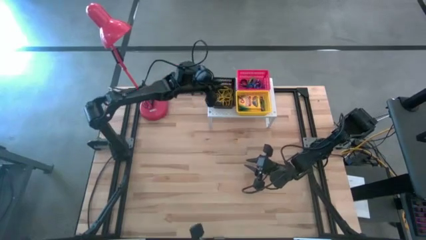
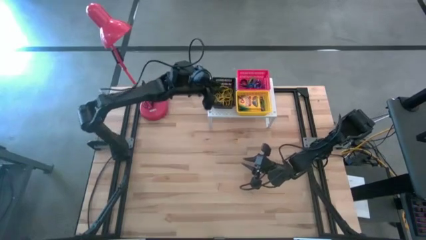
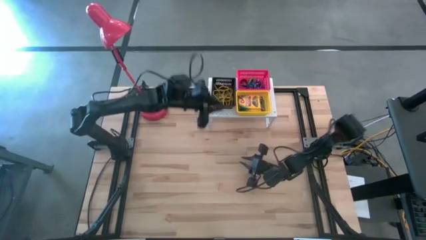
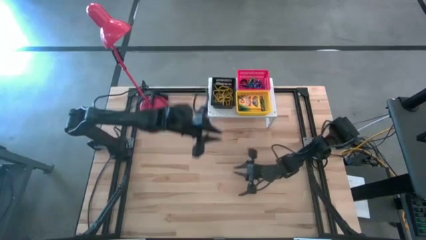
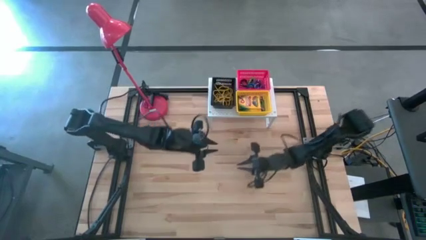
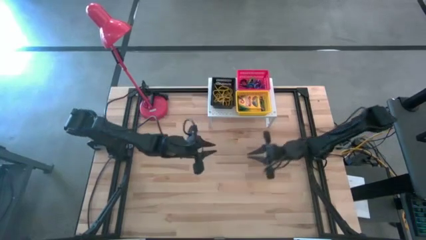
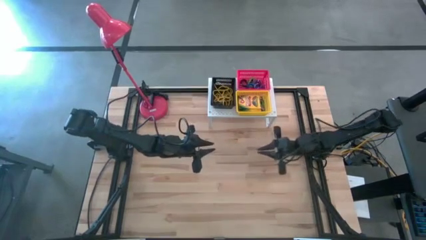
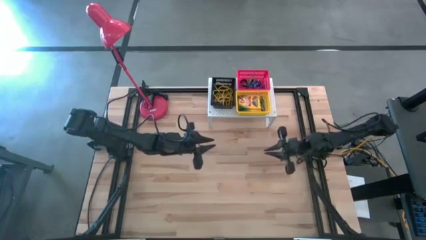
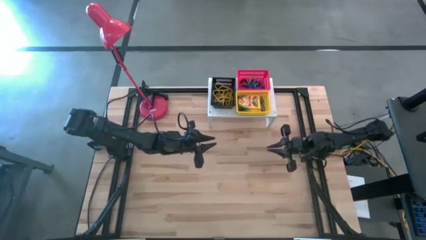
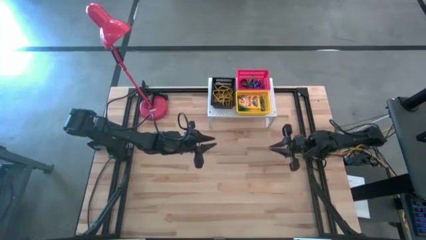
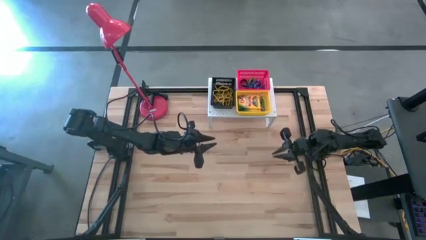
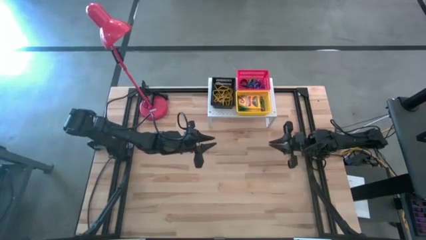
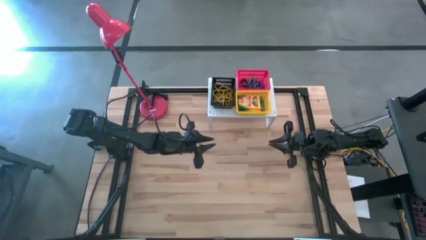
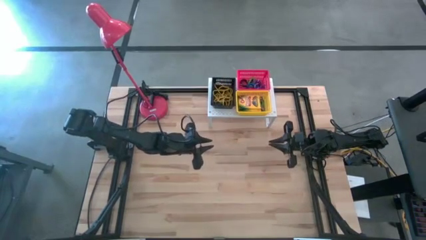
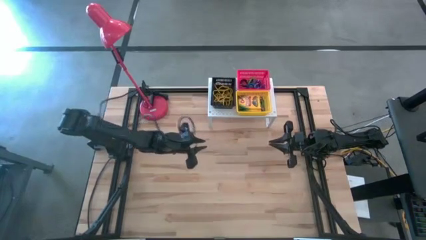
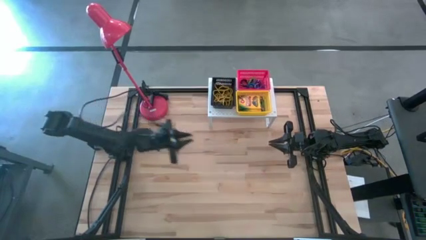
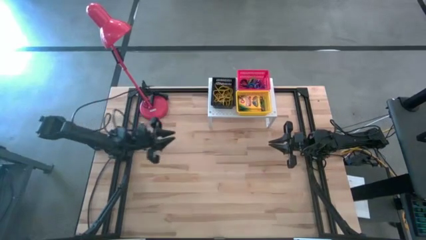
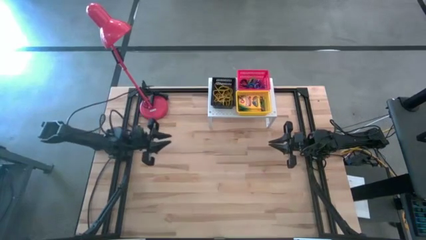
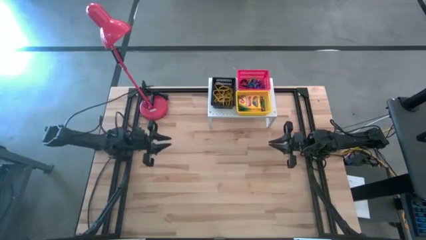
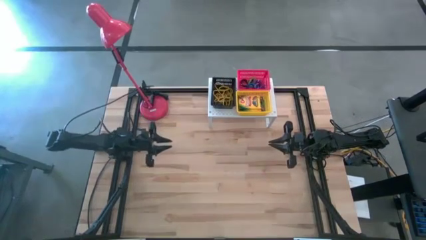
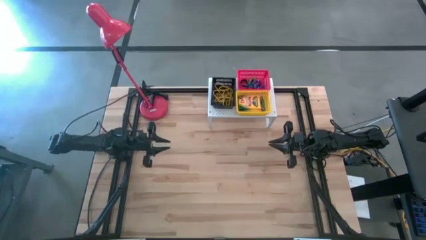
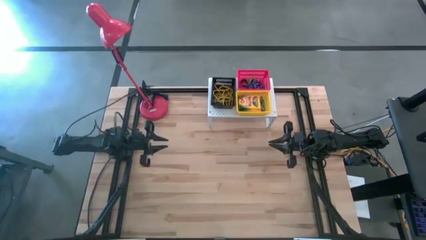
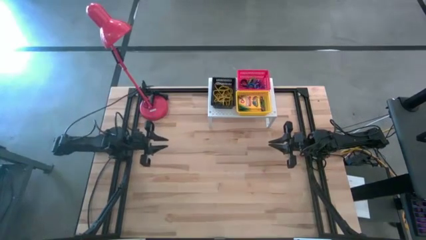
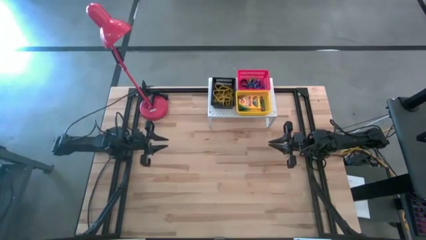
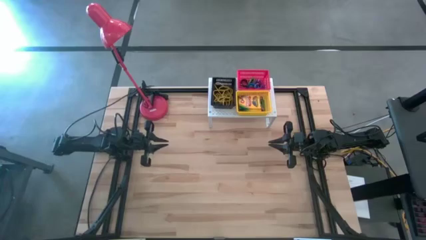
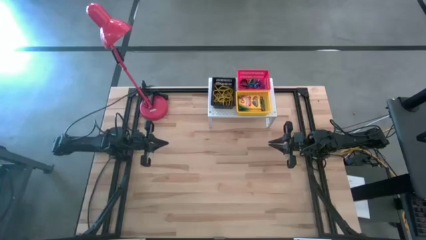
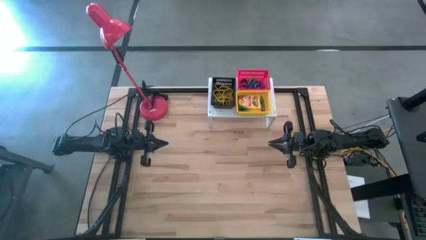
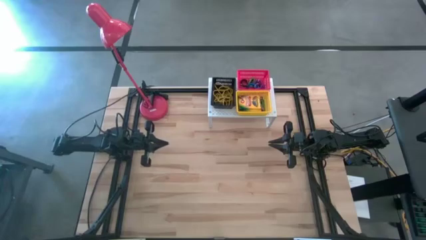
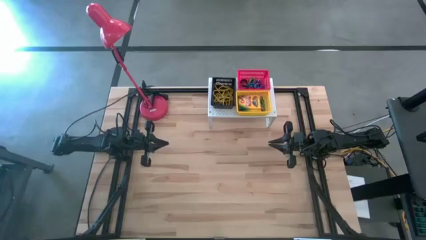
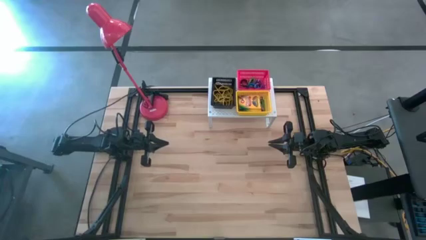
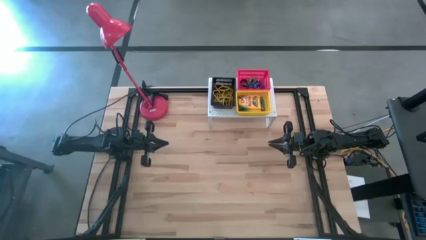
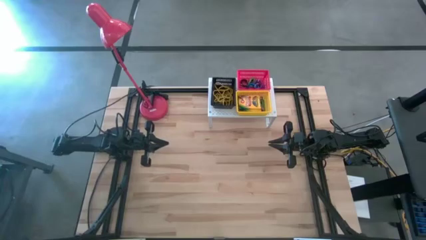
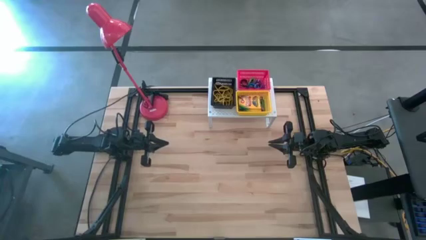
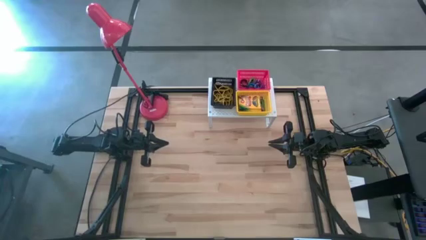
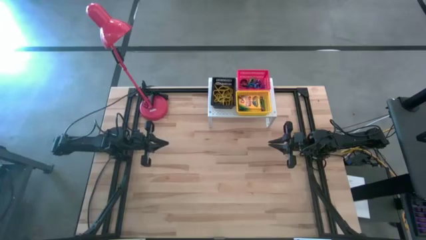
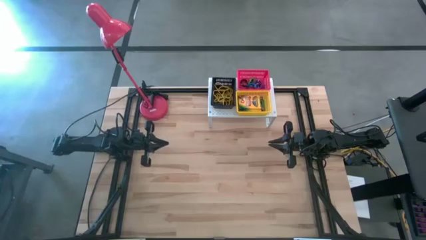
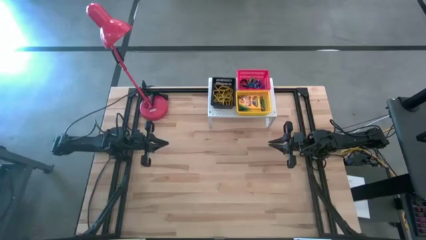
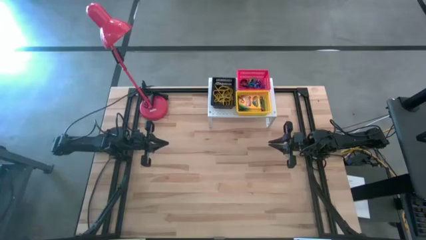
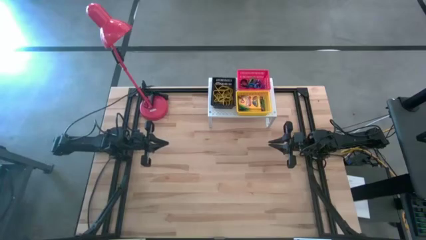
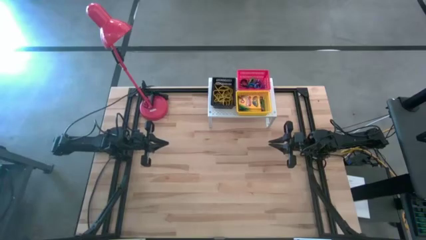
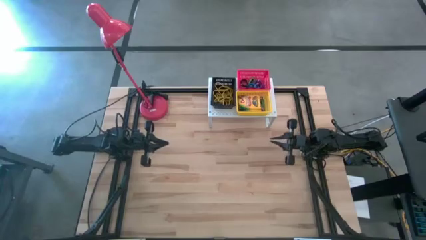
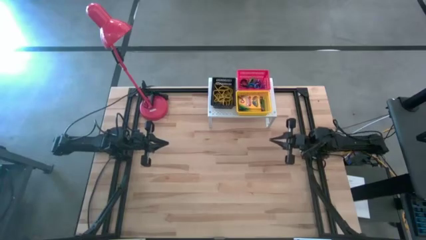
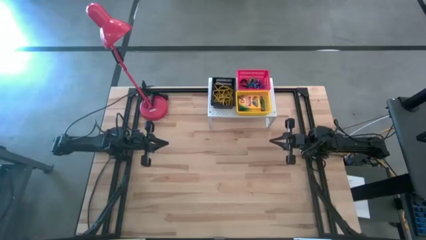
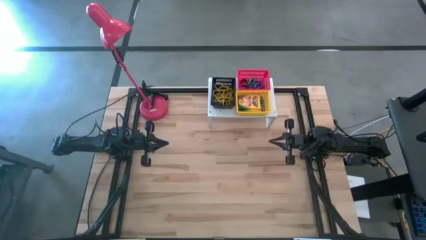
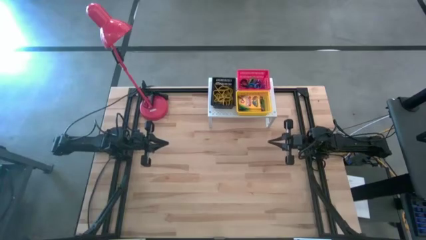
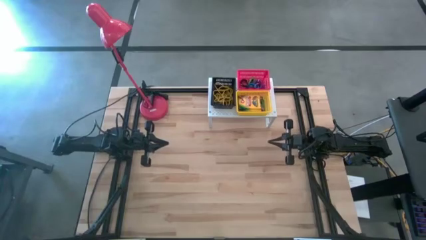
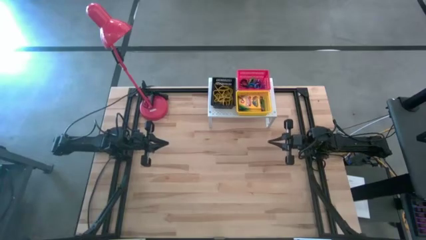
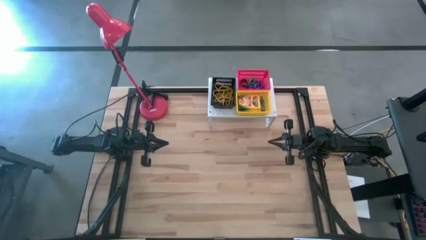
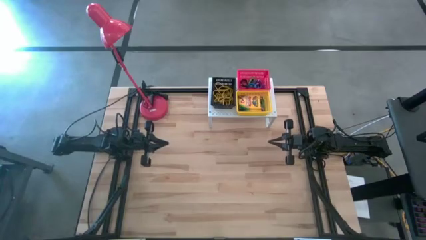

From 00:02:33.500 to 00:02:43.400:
Task: Pick & Place Office Desk Supplies
Return to Home Position

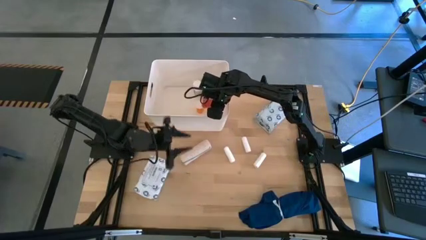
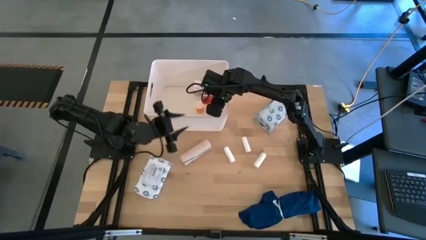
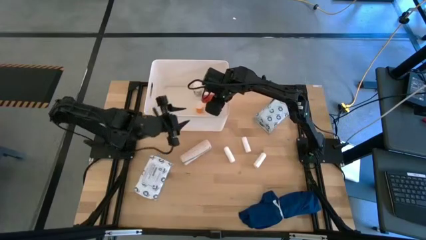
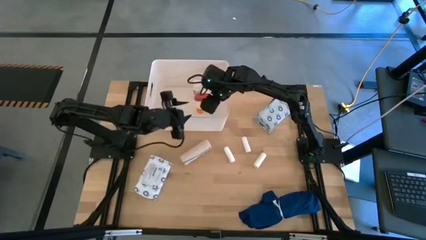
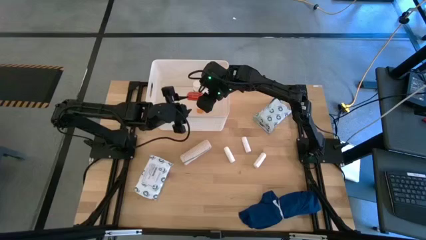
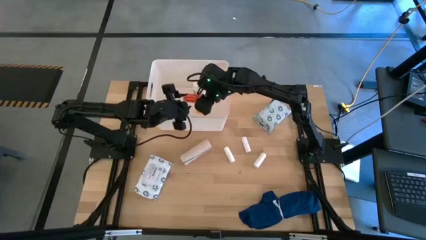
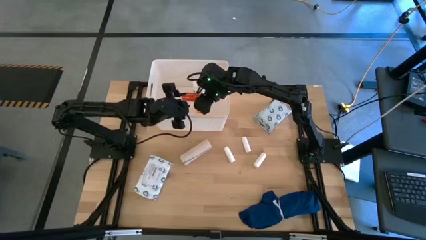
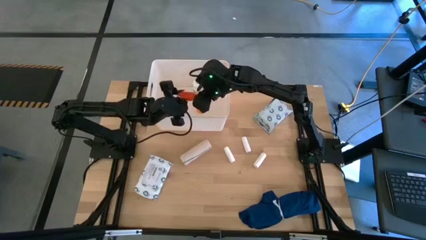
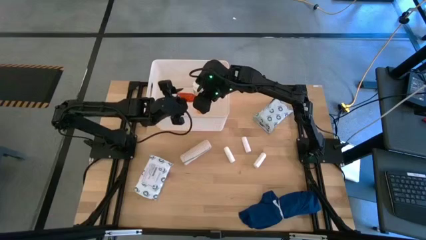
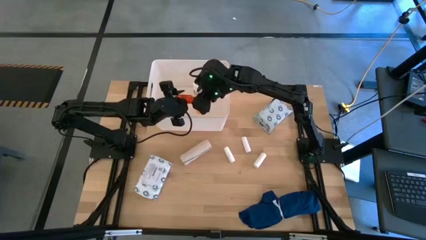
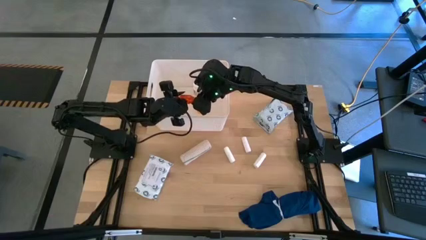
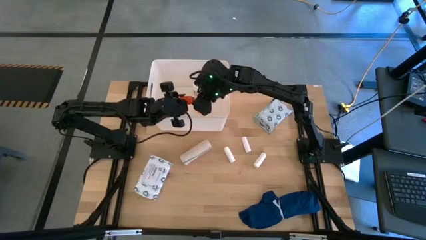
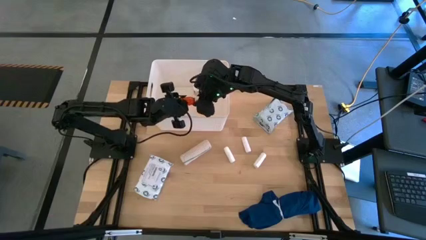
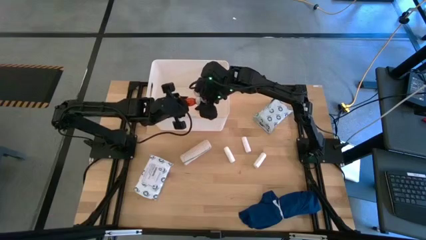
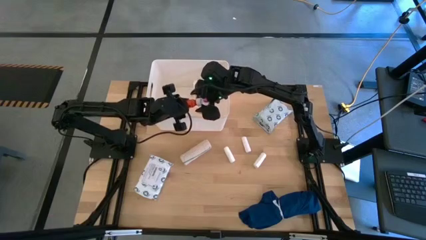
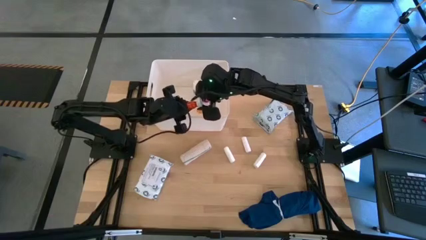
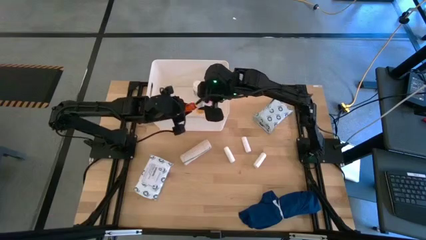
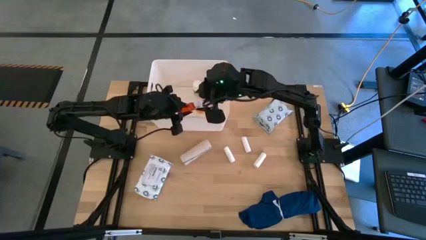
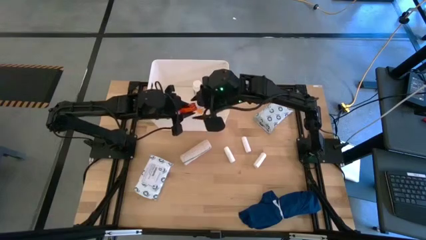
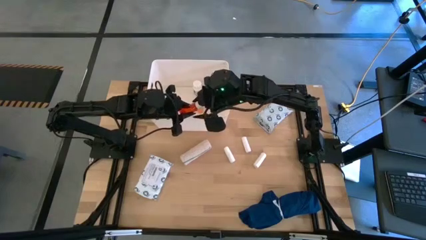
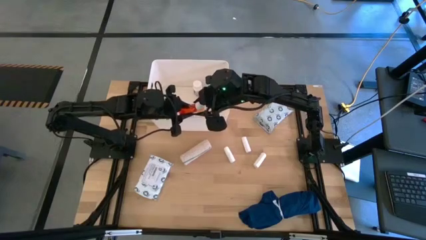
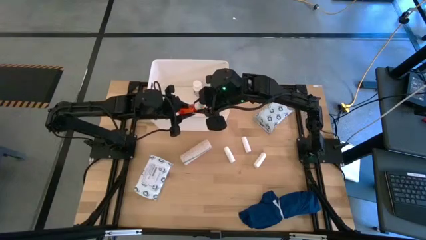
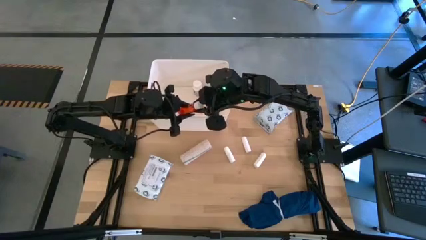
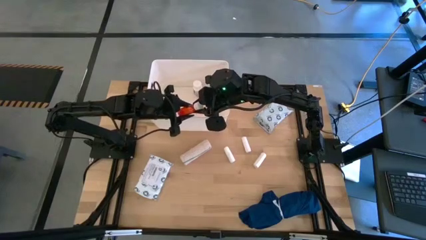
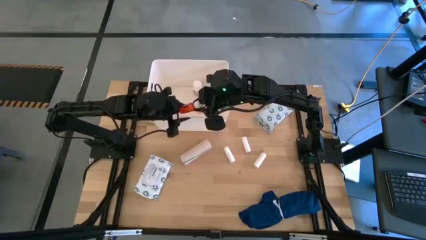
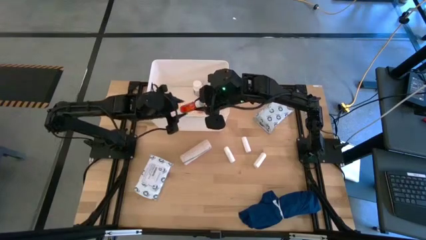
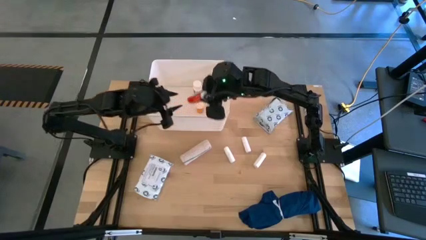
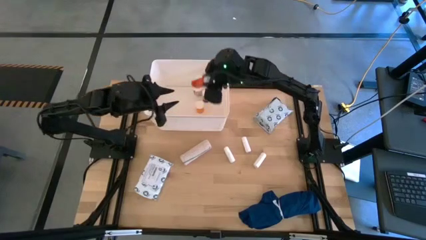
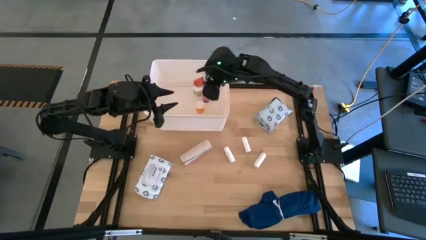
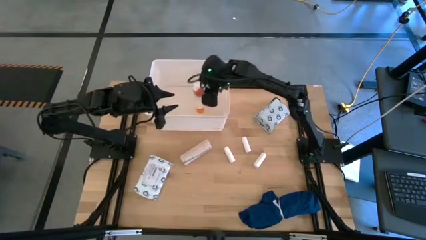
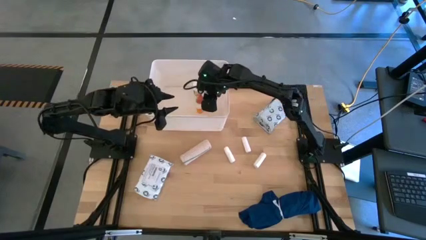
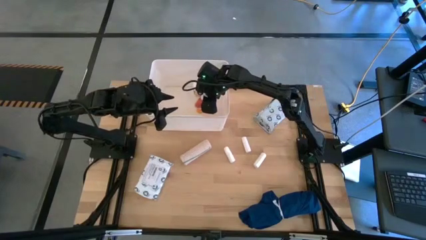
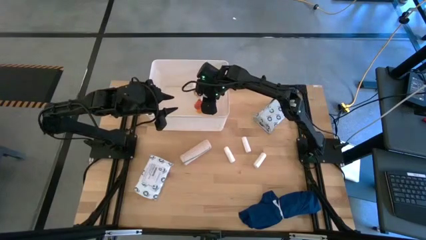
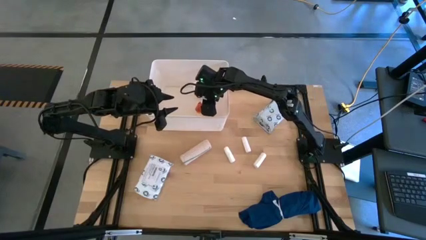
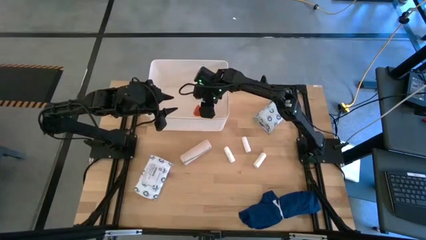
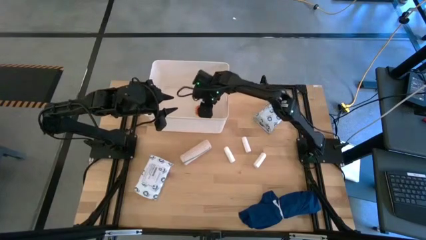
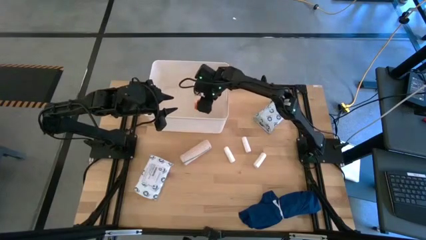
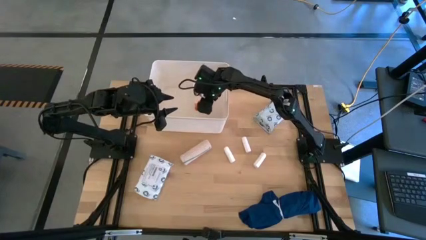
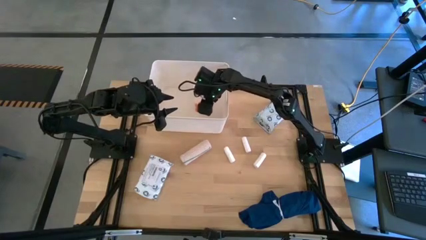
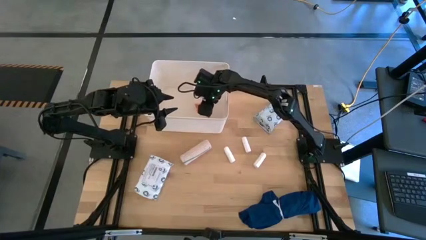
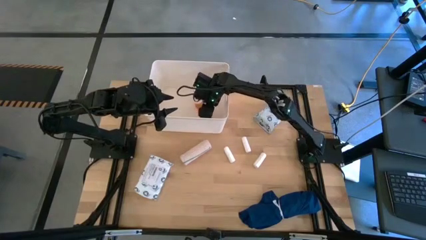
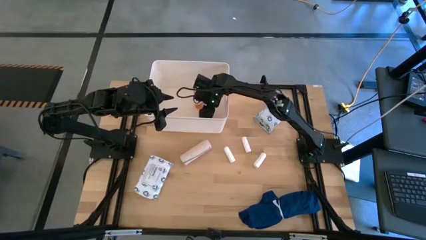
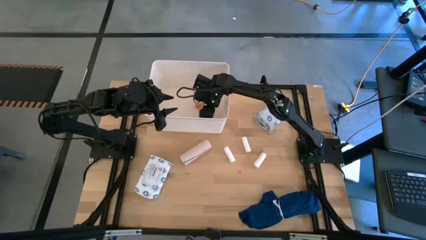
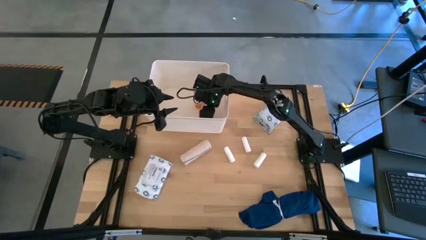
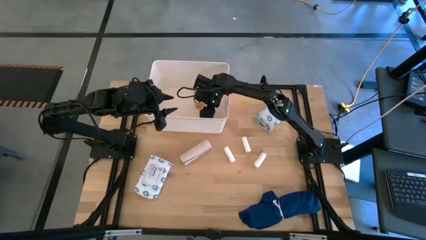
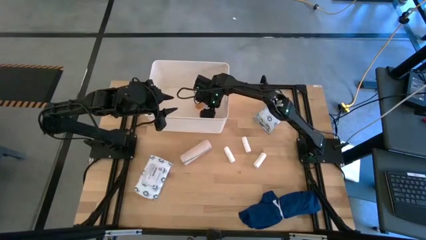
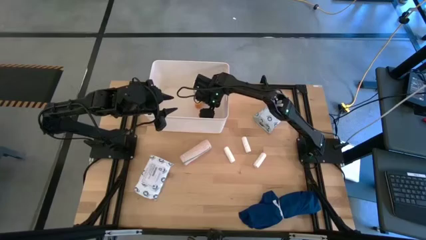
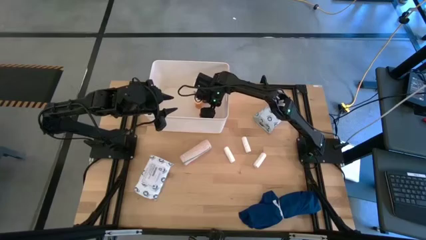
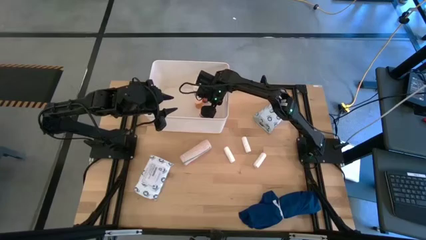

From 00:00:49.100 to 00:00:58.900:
Task: Pick & place medical supplies in basket/bin
Put the red medicine bottle into the white bin
